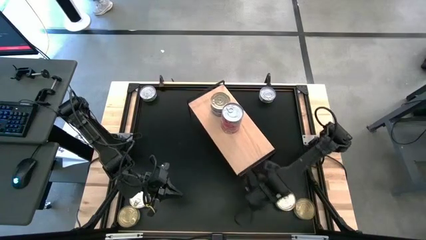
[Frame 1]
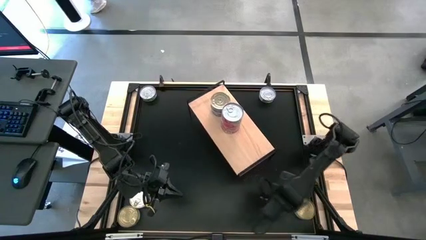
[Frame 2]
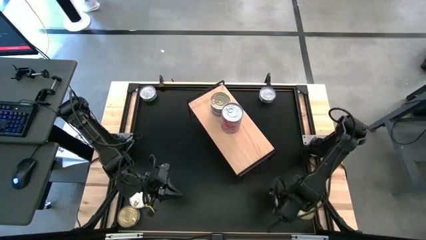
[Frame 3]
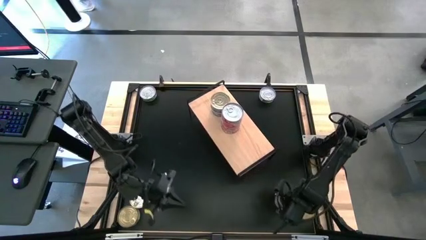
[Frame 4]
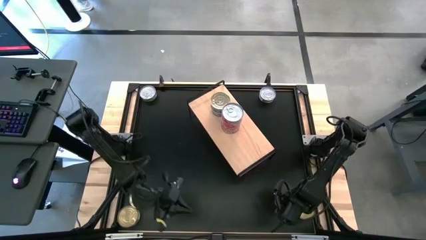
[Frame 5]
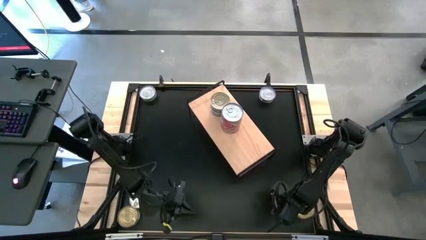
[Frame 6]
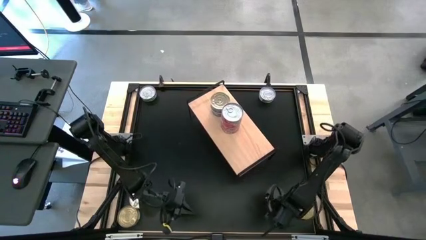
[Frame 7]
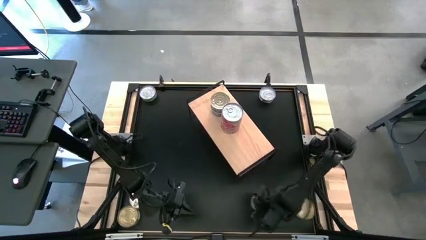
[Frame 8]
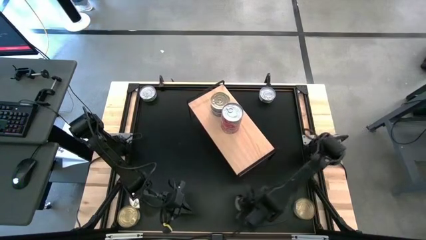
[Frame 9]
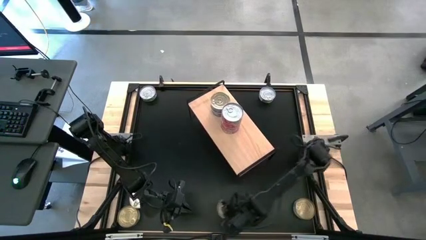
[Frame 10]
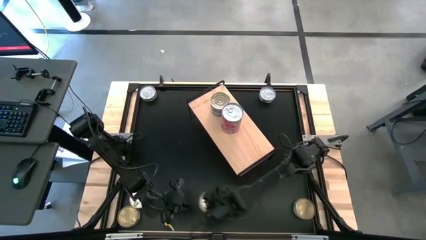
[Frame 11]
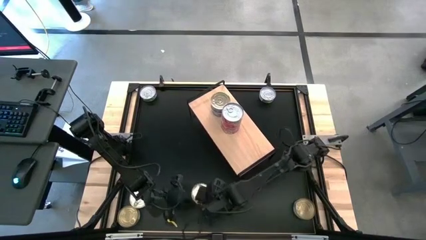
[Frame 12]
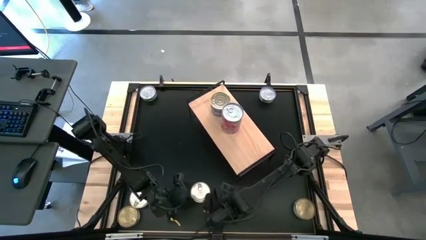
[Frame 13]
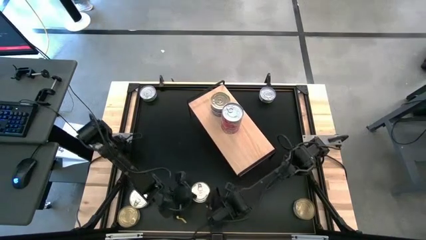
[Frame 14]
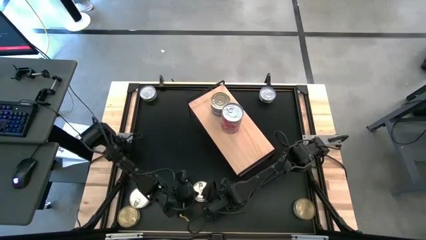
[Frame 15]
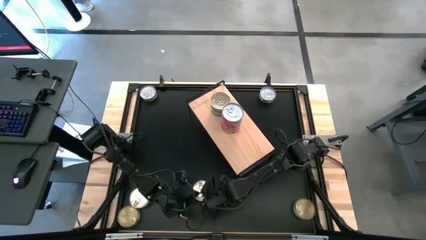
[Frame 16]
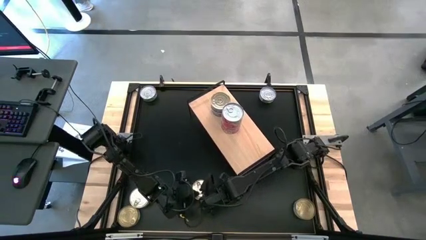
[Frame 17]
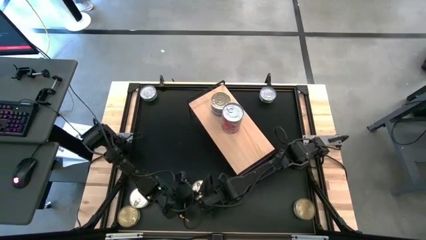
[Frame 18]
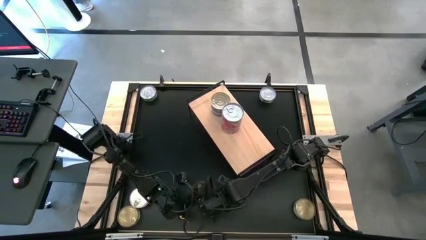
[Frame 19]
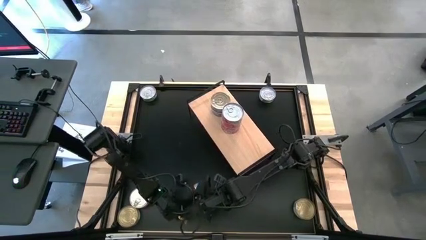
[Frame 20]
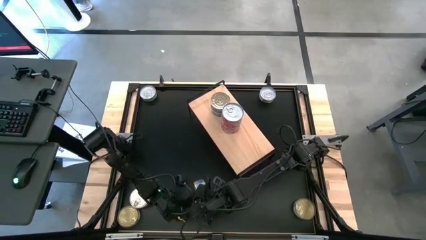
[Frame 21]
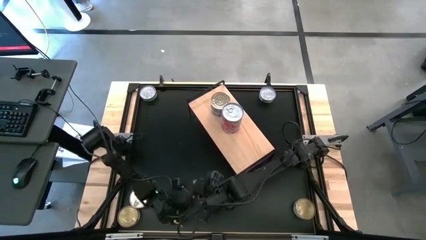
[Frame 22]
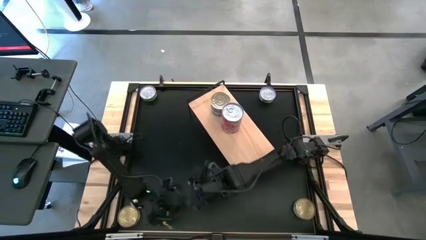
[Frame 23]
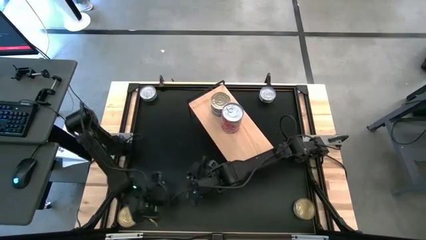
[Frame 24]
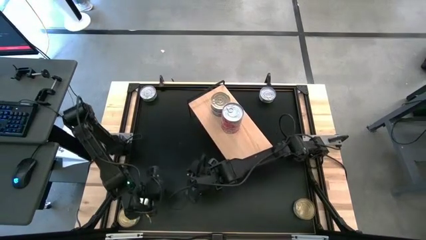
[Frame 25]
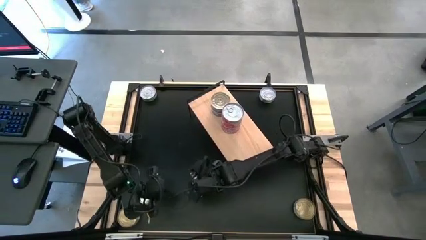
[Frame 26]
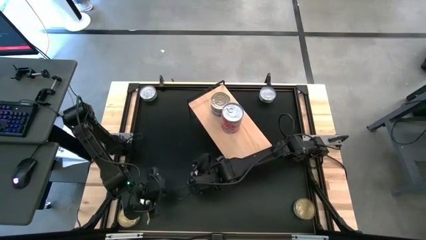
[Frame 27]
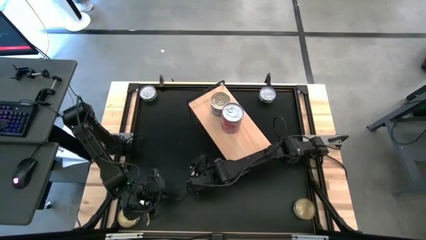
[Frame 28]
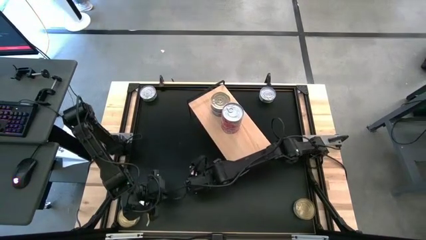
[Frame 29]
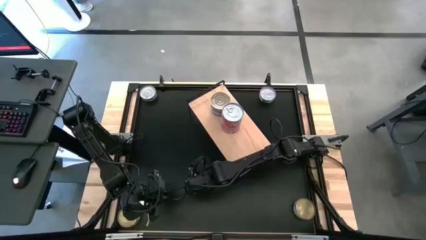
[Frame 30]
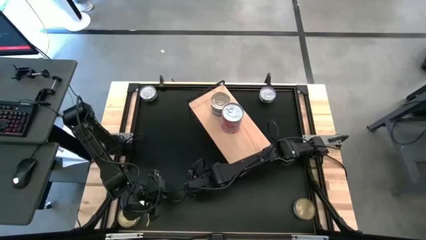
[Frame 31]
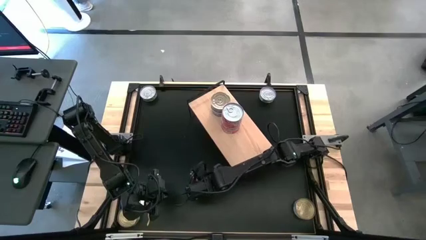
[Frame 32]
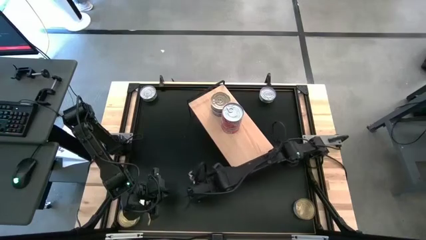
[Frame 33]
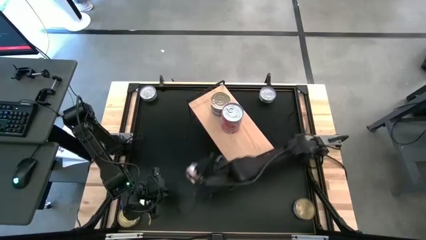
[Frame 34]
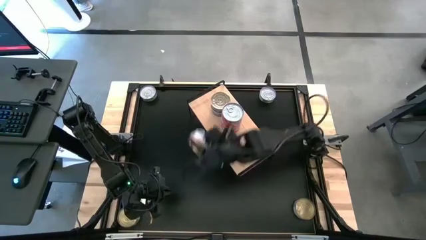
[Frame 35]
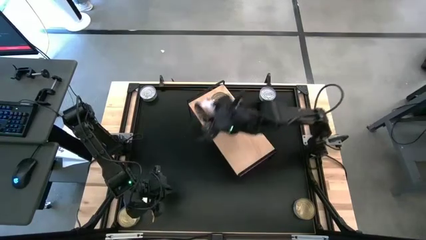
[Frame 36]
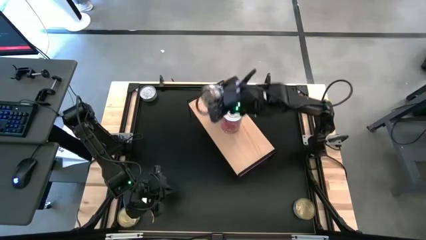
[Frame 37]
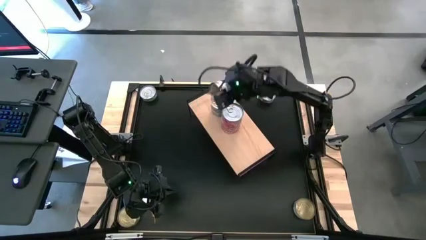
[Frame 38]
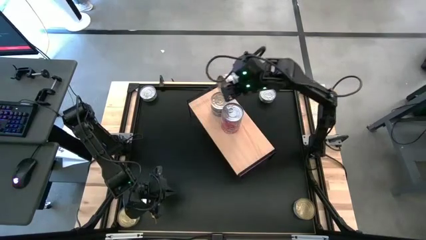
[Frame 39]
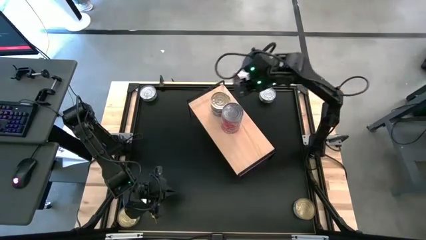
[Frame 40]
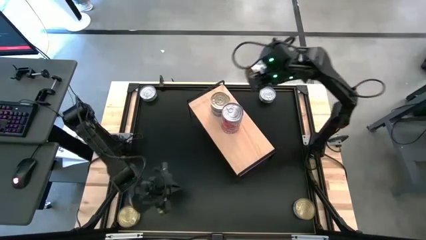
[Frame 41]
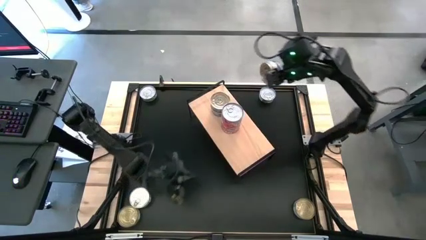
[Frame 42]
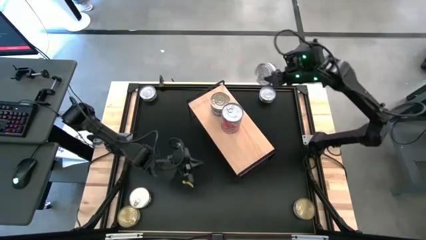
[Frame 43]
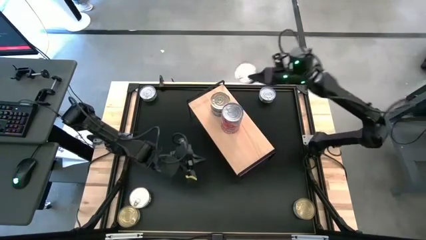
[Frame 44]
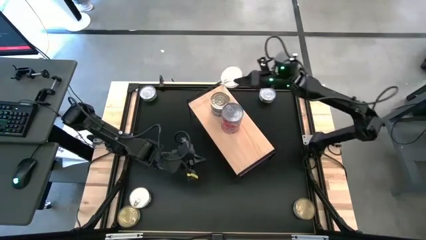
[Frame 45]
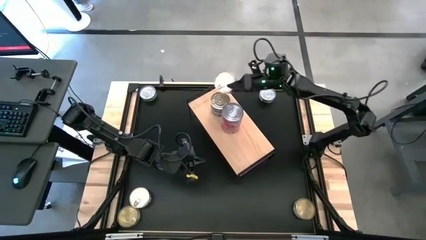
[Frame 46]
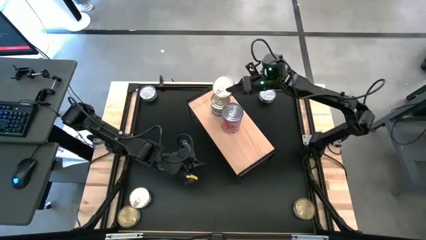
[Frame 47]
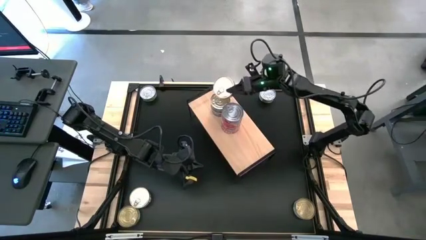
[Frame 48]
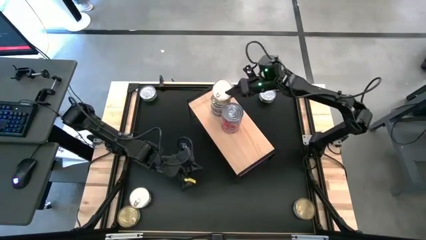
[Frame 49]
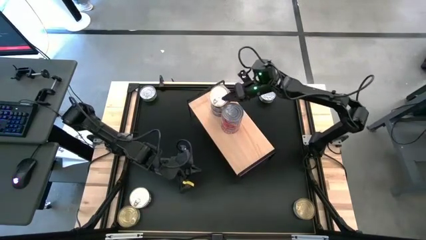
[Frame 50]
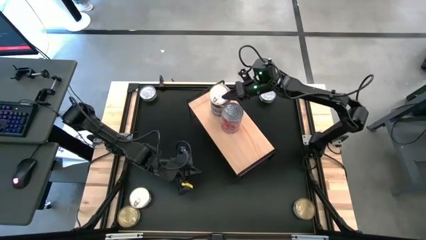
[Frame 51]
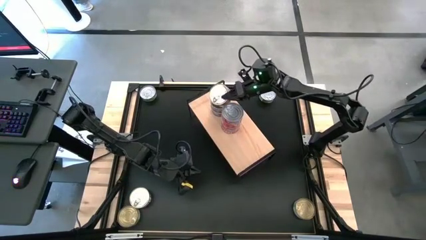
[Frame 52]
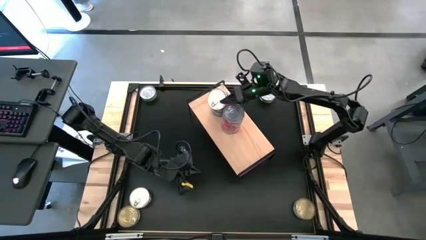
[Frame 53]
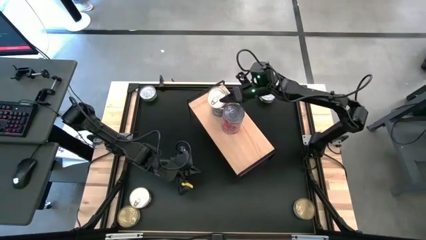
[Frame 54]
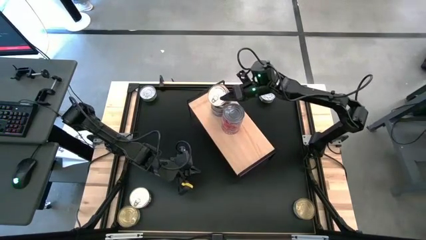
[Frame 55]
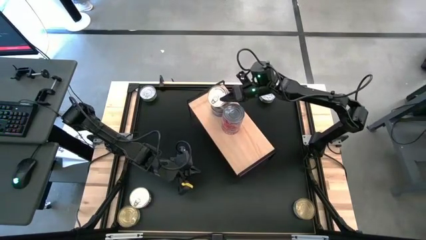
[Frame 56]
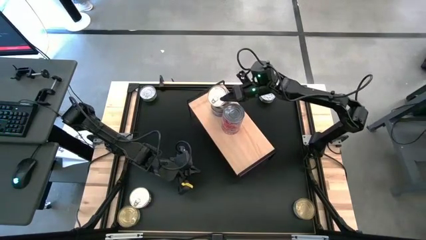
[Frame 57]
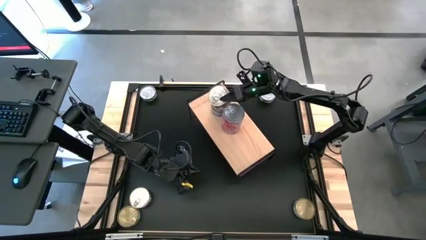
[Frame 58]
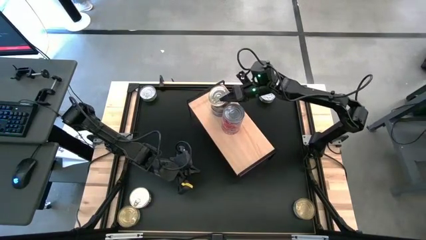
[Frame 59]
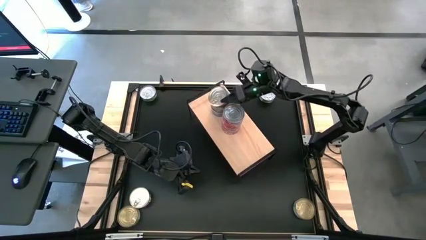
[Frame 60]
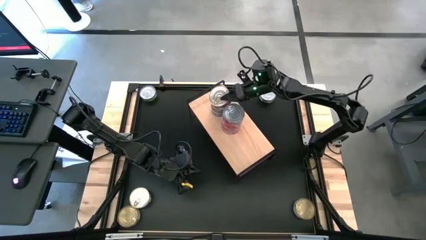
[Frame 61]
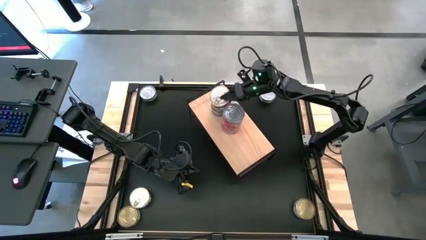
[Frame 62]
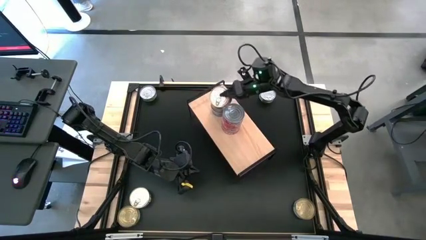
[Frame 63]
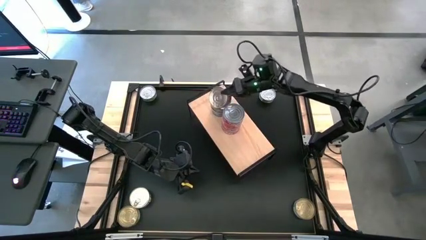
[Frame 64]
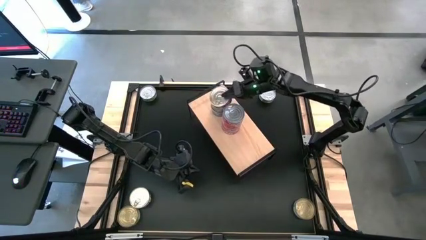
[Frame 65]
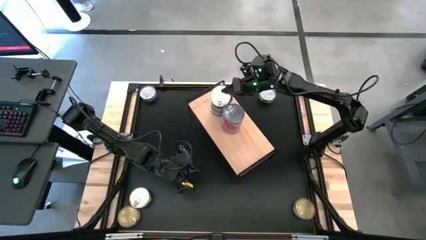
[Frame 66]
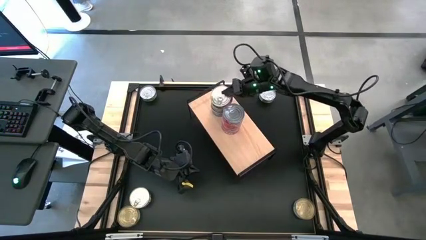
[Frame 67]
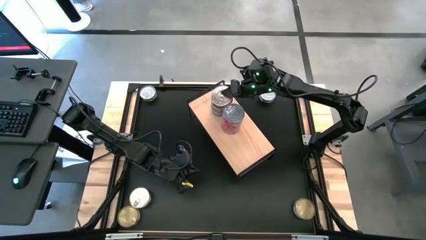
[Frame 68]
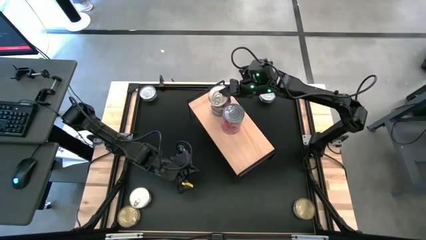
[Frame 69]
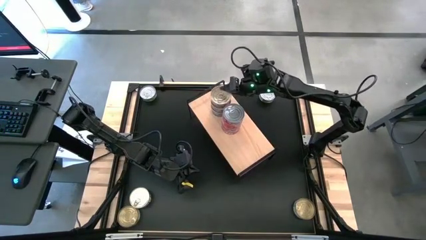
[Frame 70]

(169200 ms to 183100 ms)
Task: Stack canned seafood by type on shelf
Stack the blue tuna can on top of blue tuna can on the shelf
